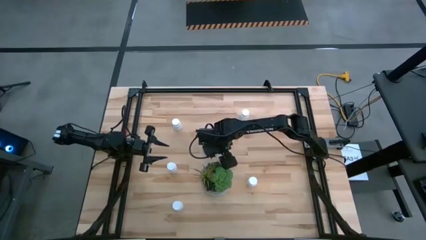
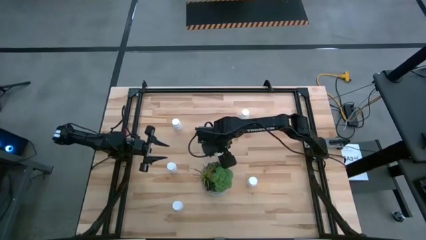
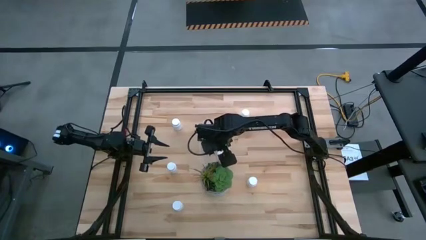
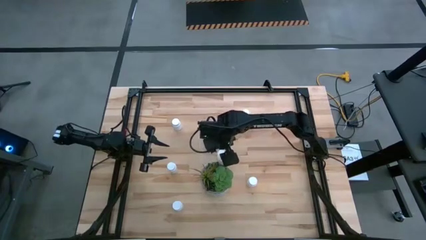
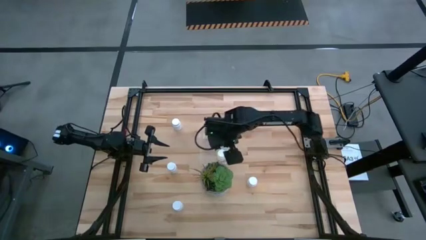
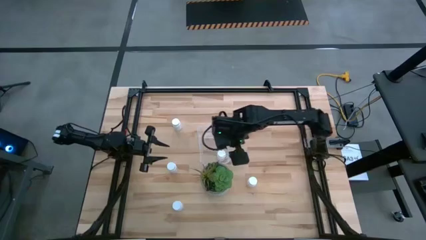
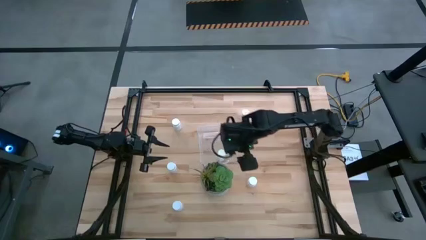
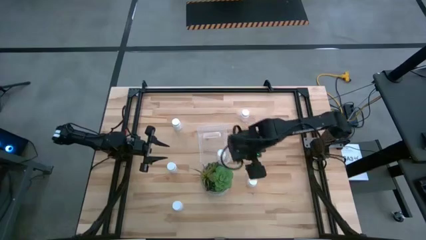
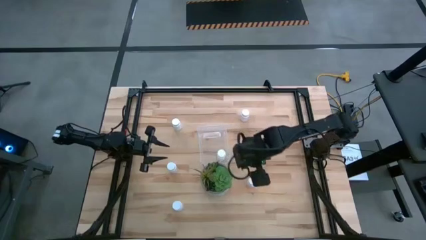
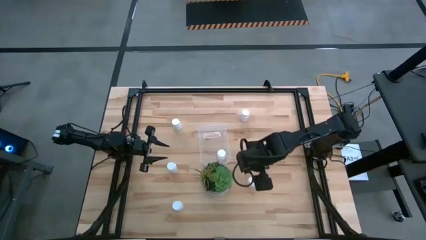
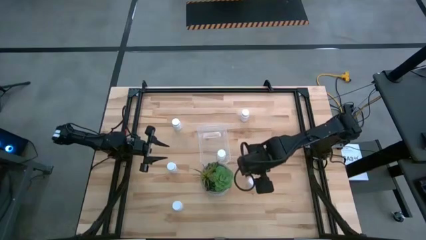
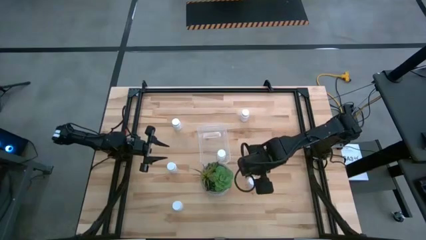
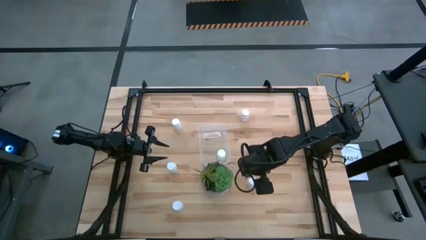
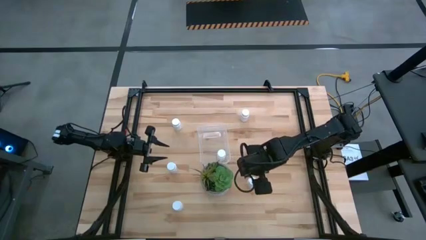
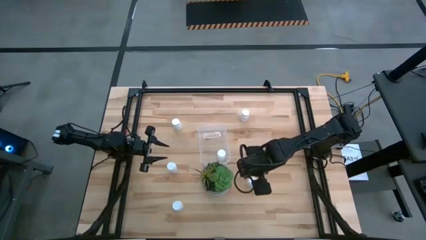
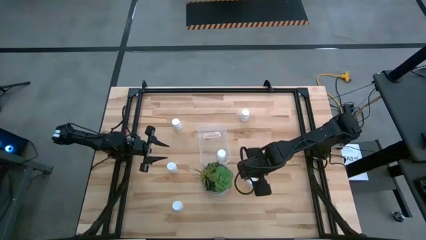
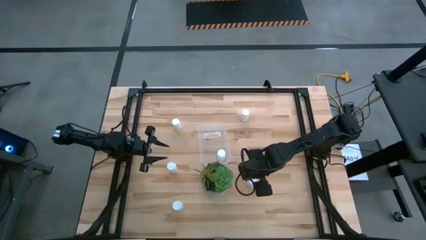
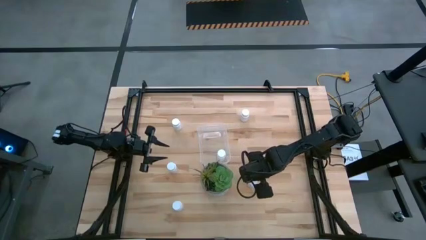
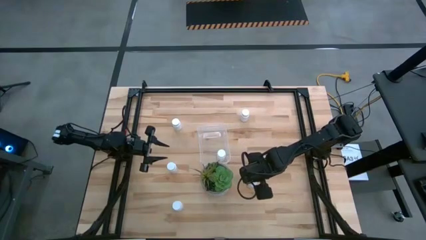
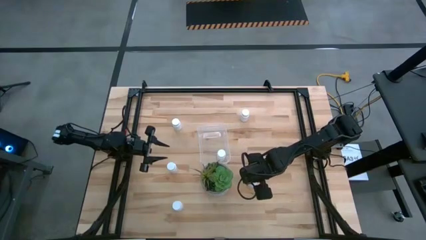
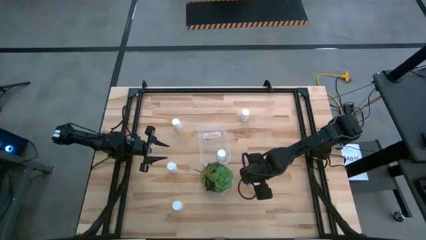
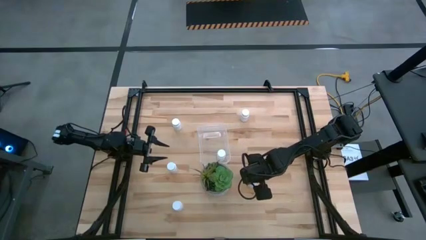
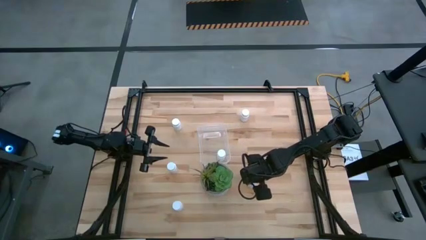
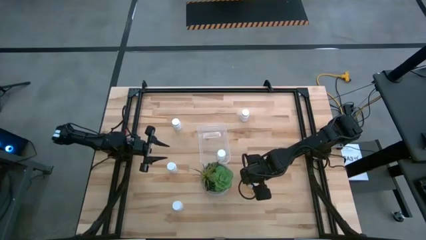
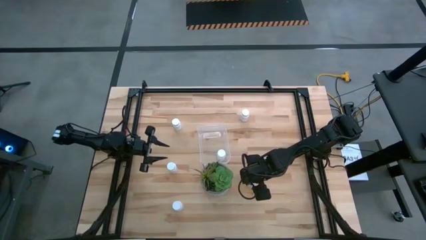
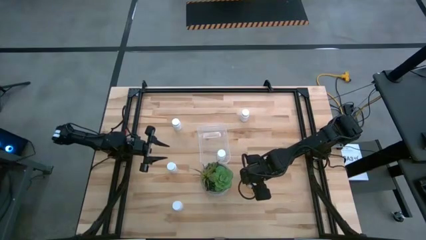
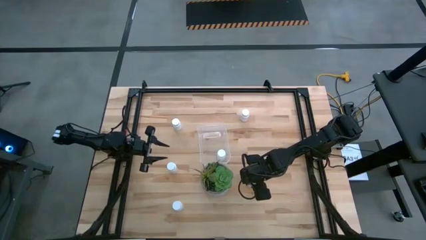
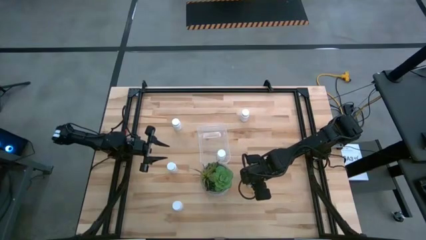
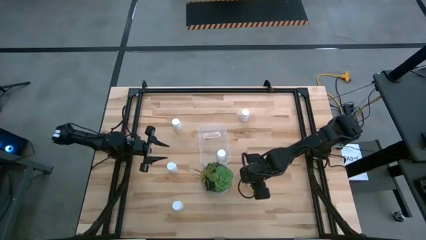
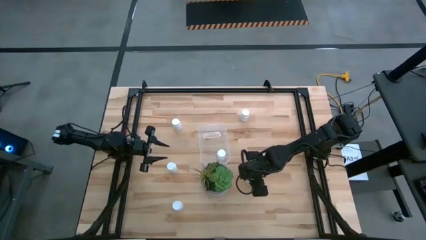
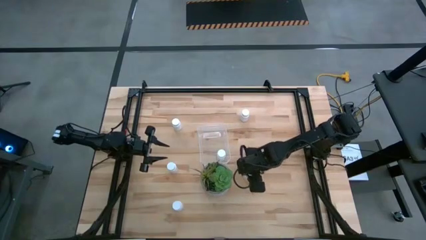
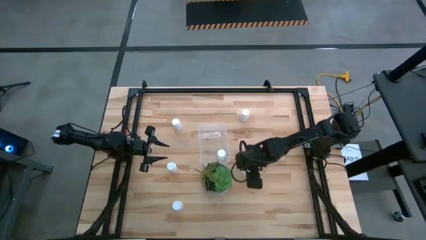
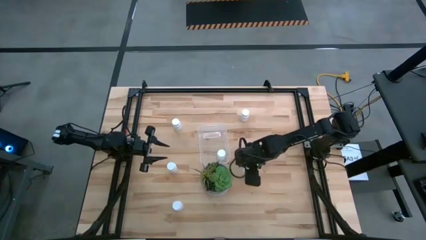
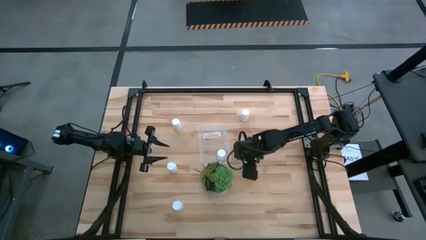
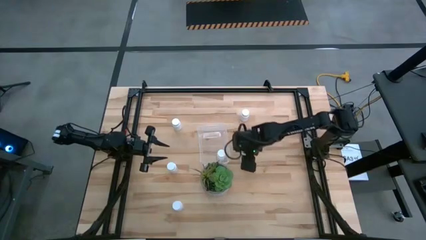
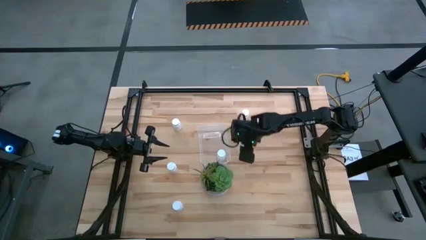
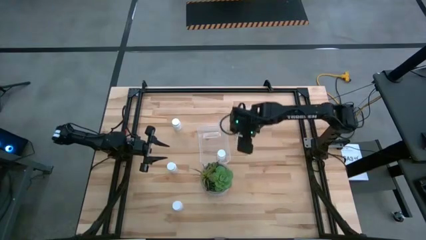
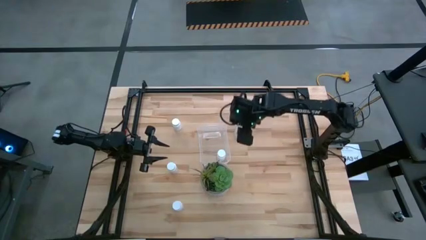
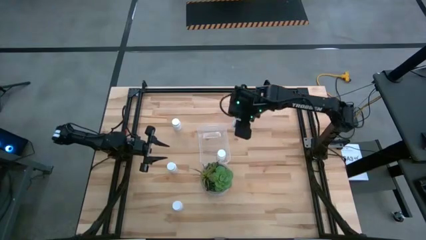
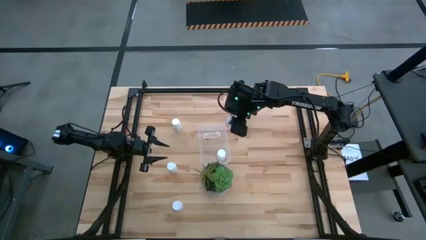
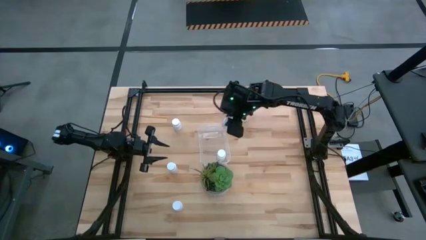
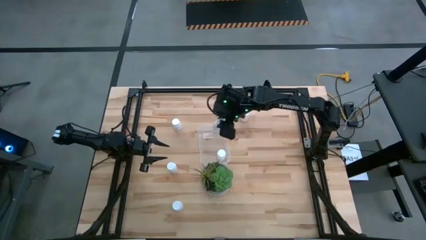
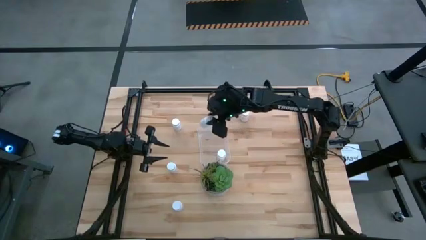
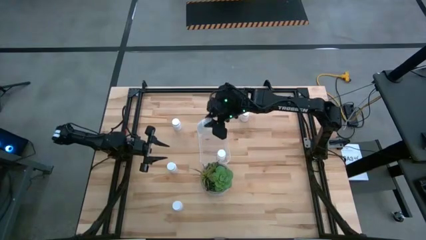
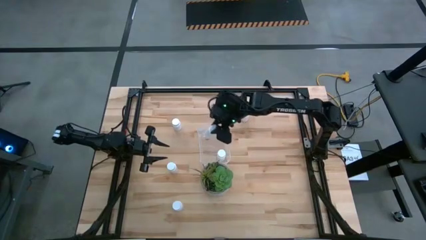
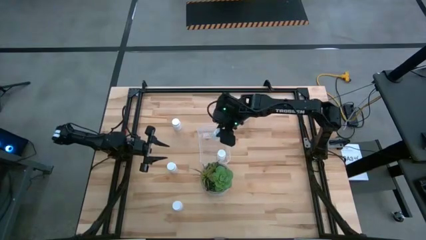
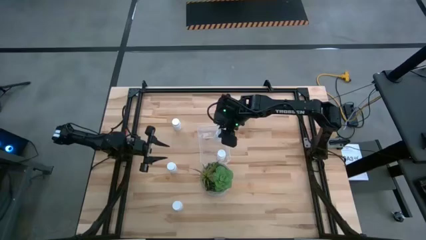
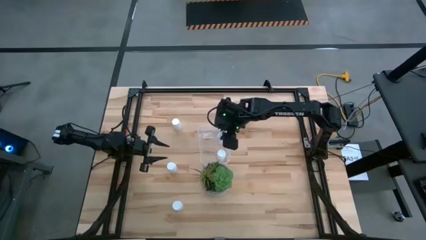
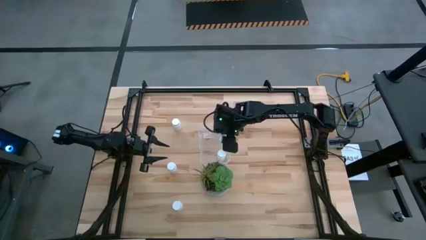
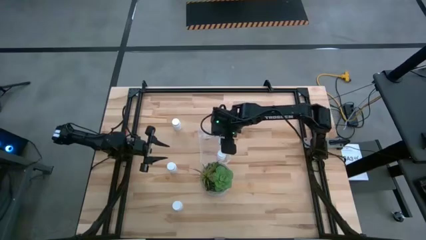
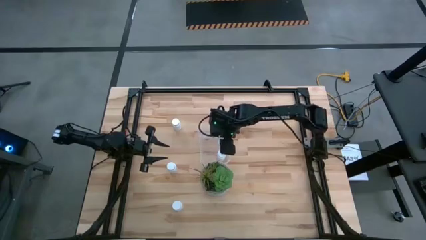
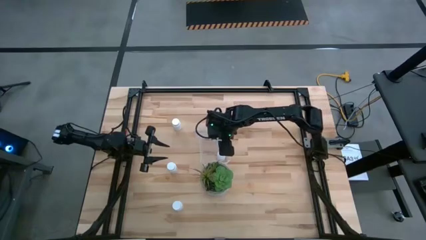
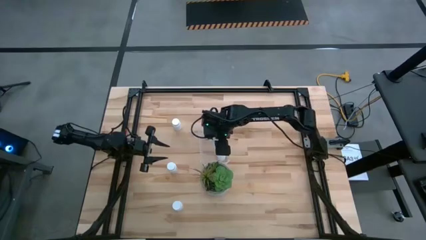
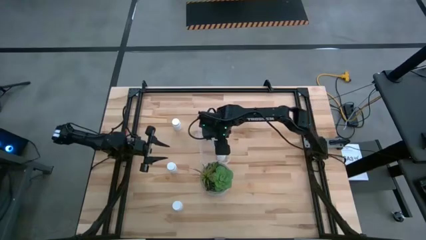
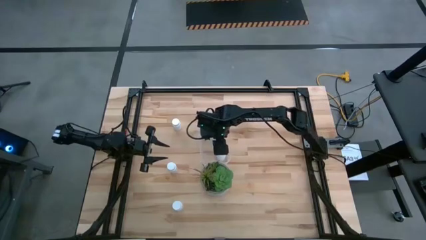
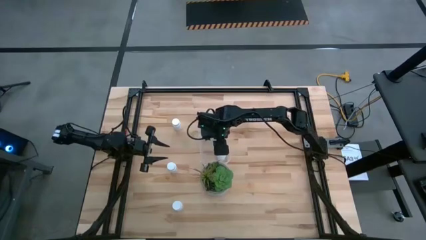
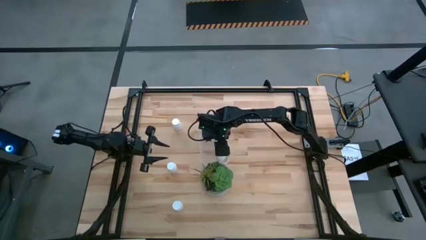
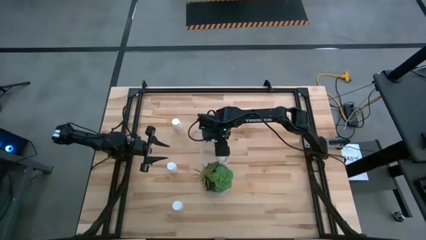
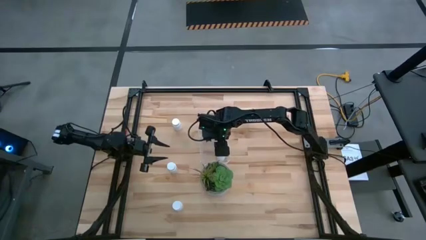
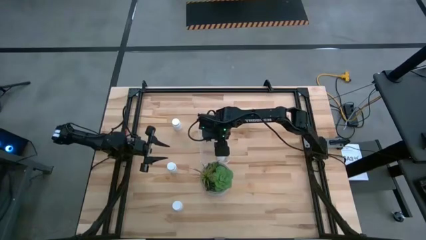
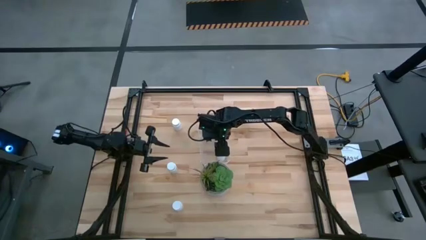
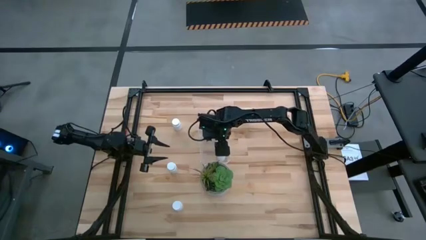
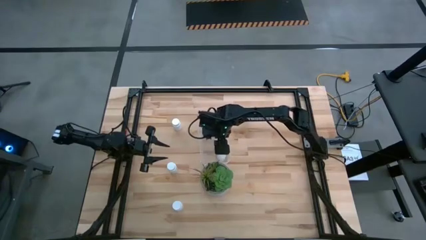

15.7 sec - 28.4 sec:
Task: Pick and place pill bottles into a basket
Put the white pill bottle into the transparent bin

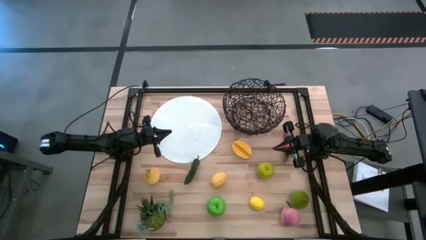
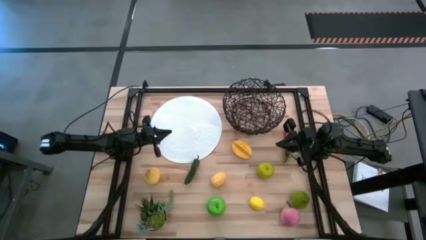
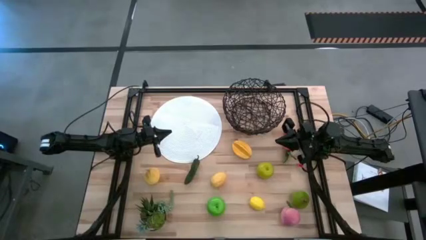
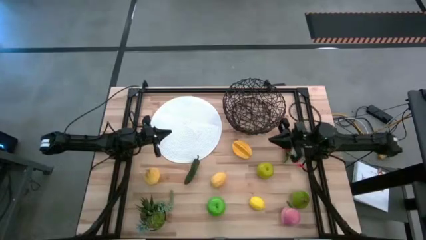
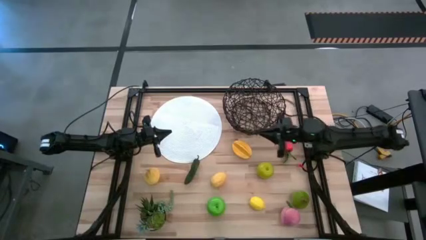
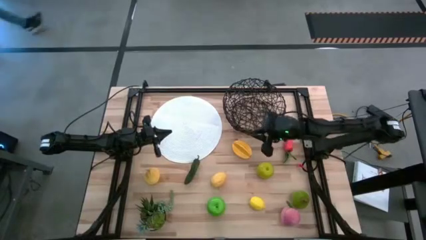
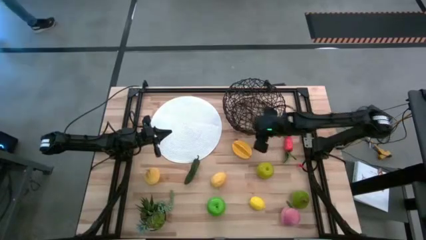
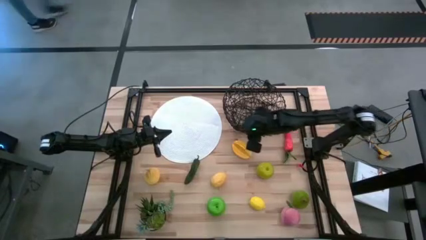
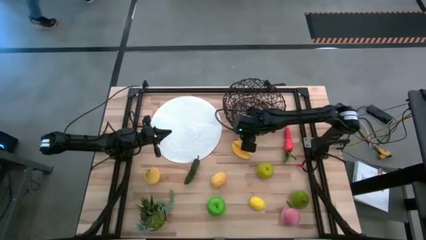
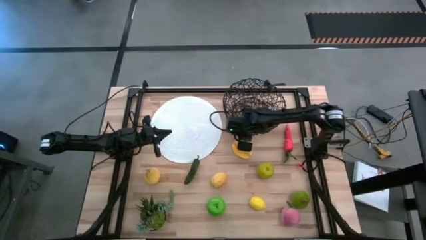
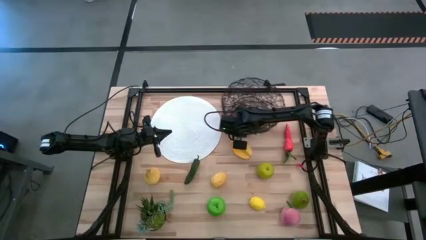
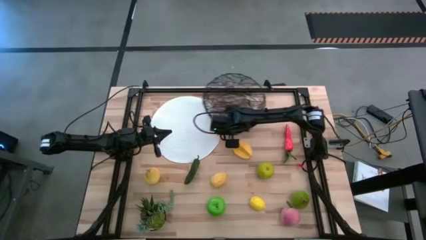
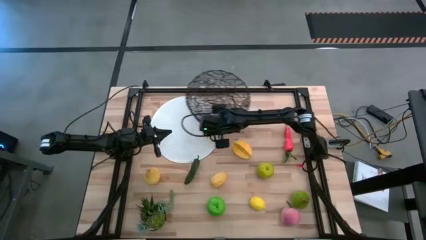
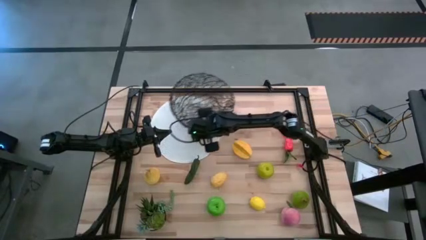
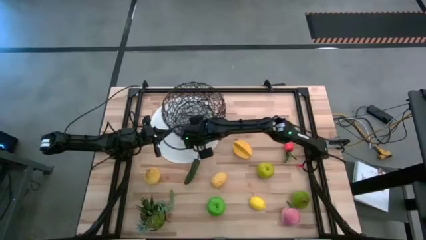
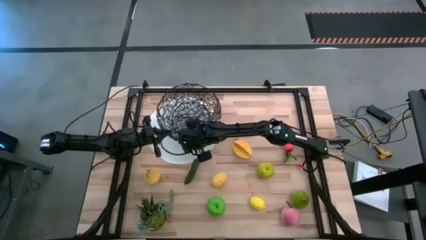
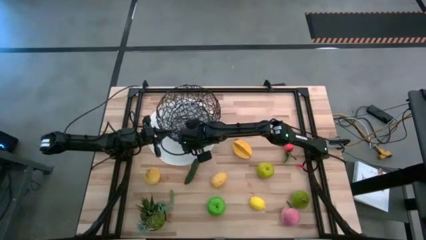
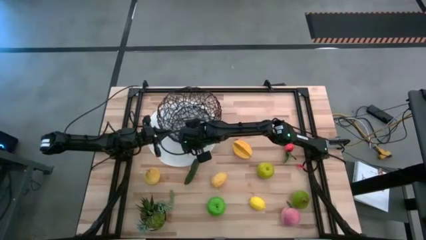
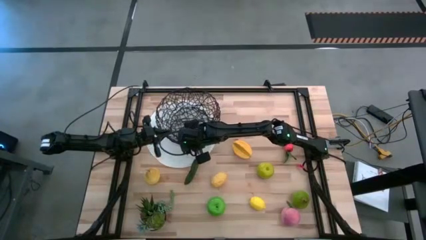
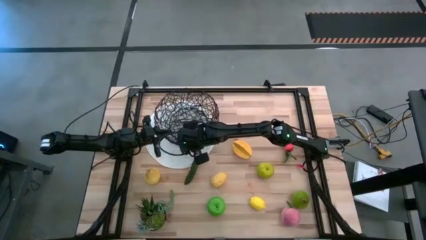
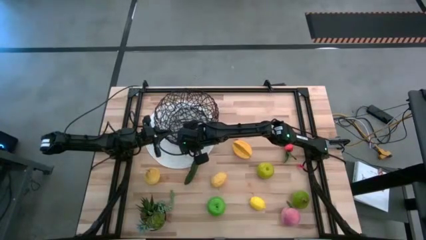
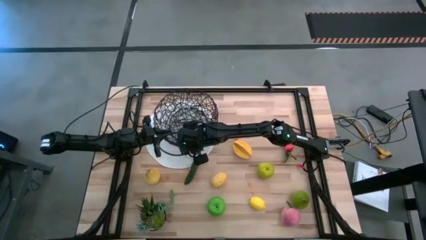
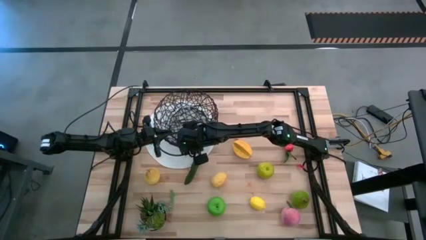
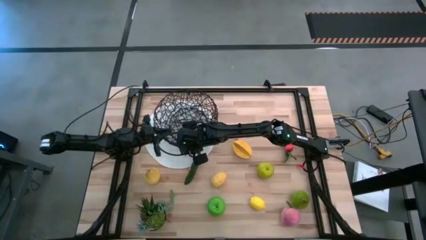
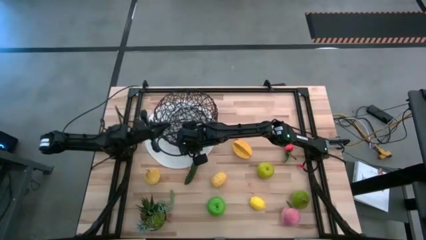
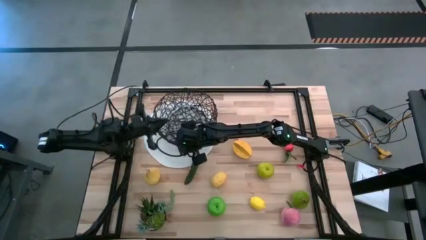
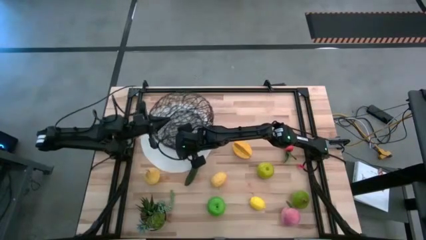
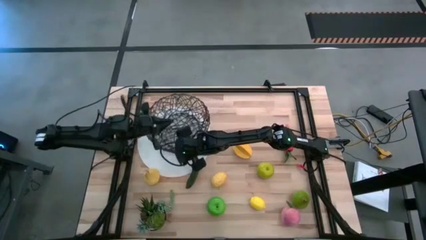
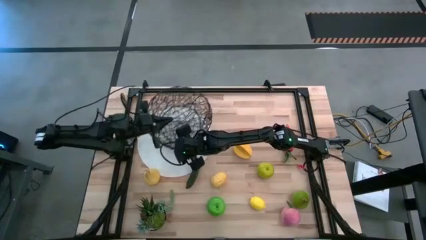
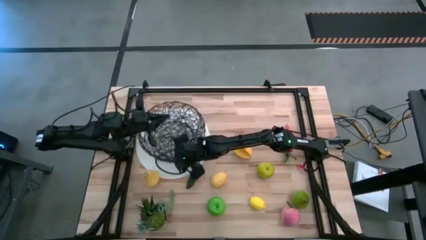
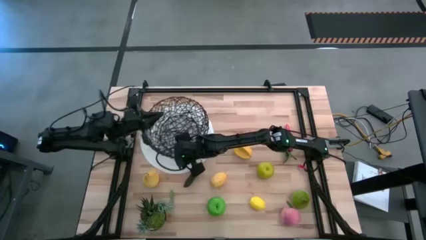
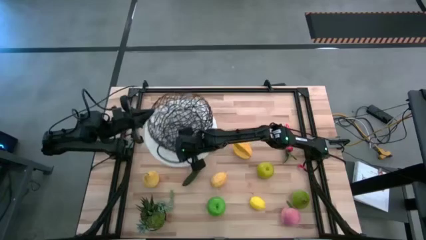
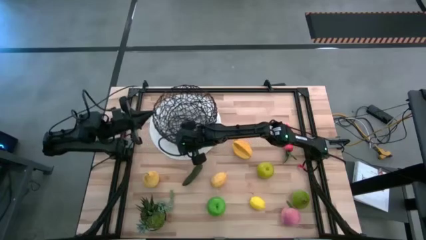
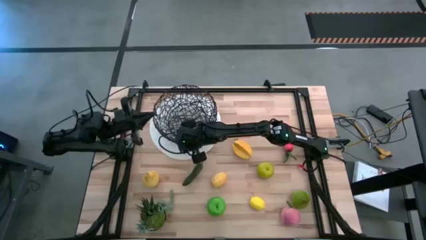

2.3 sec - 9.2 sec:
Task: Build produce basket
Put the wire basket on the table mat
